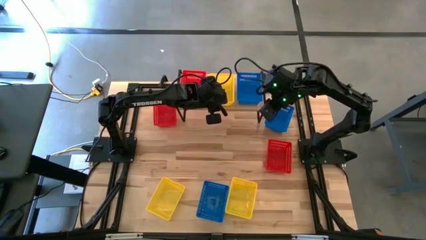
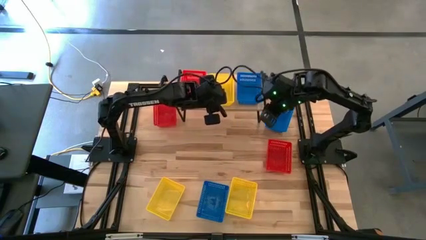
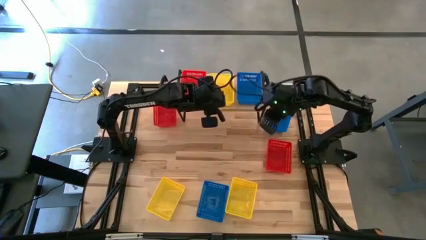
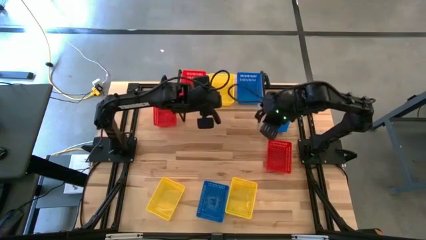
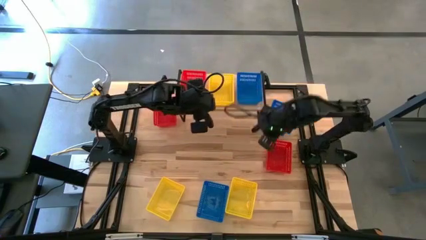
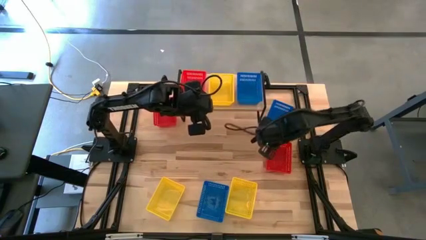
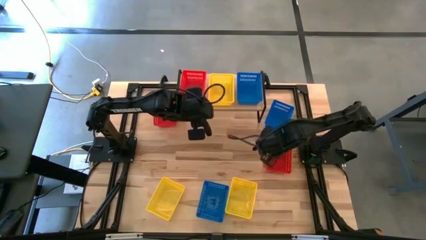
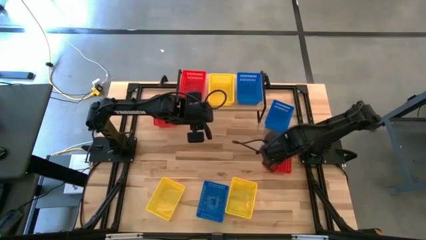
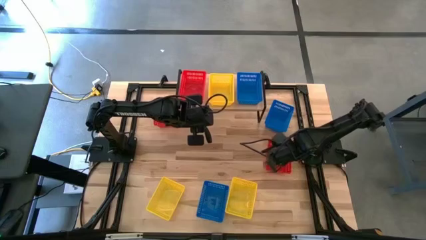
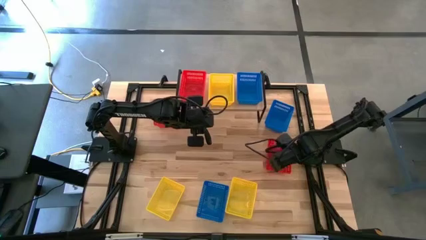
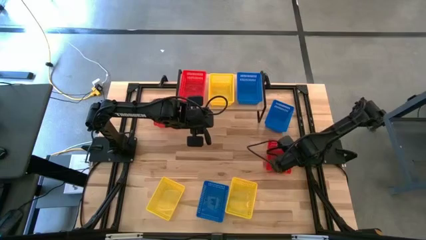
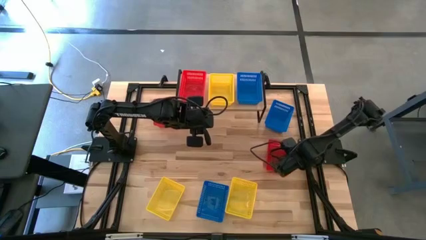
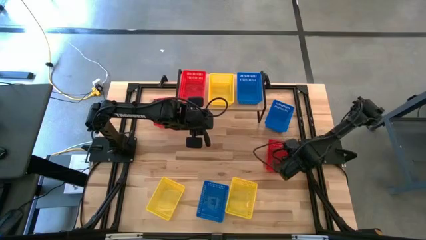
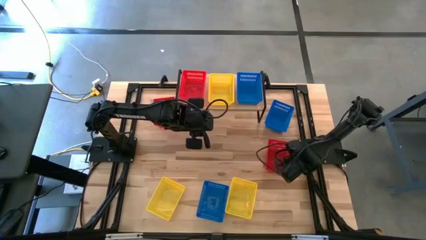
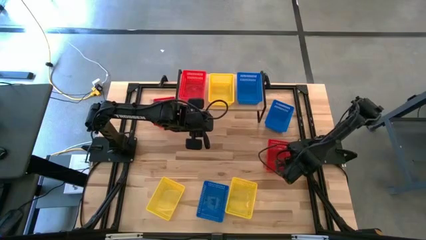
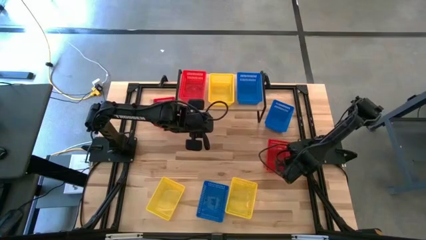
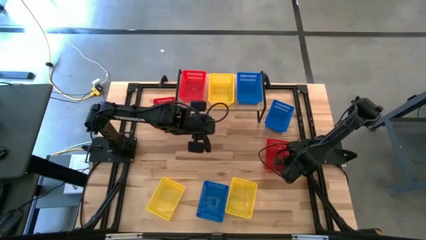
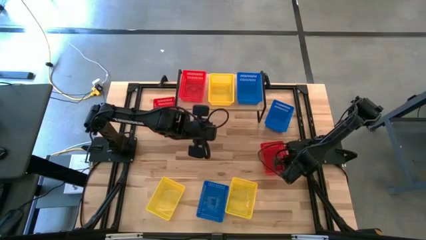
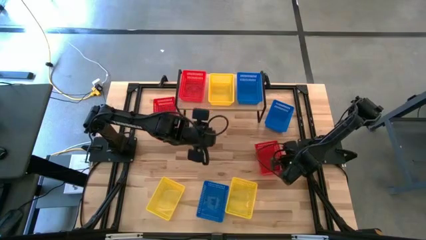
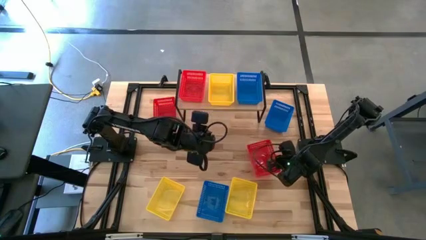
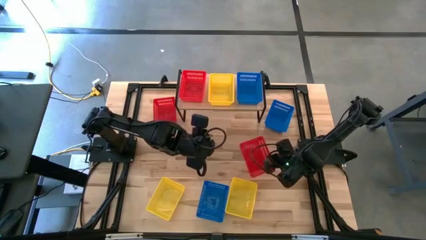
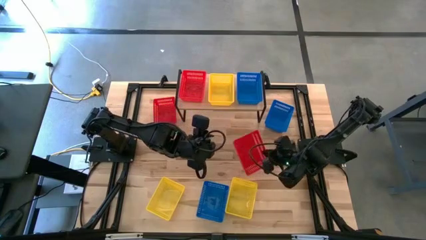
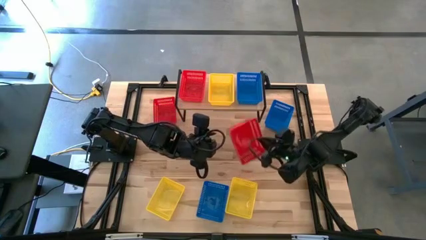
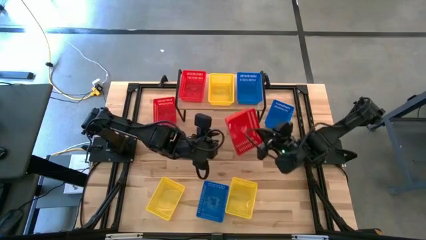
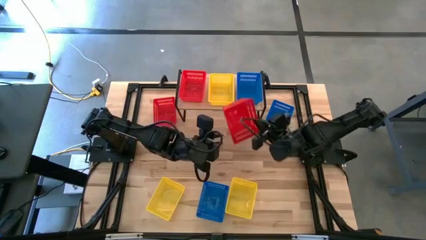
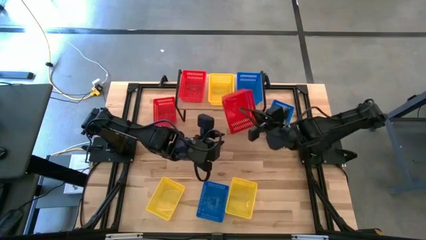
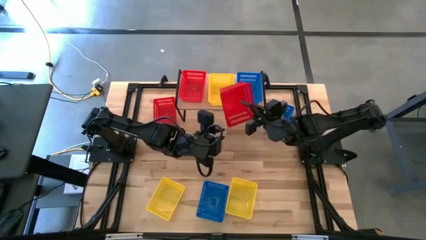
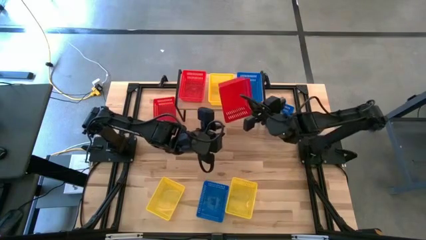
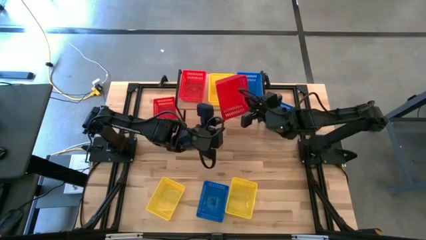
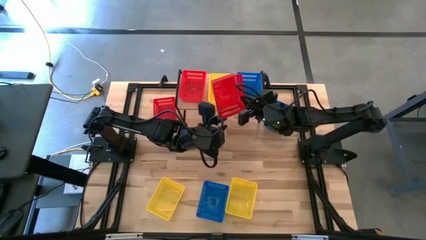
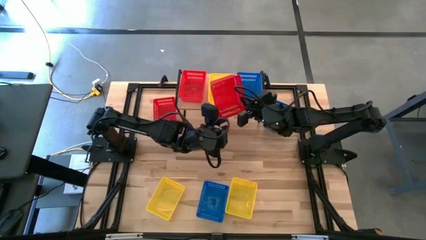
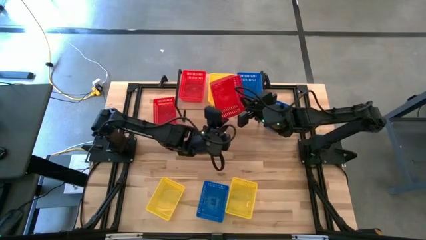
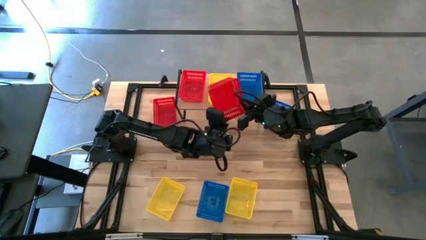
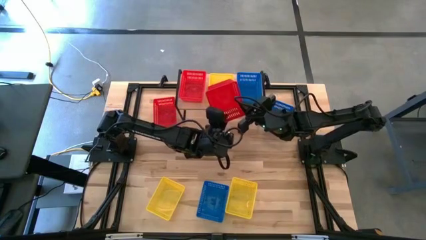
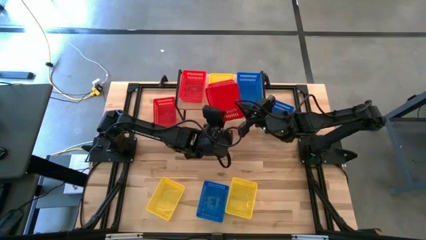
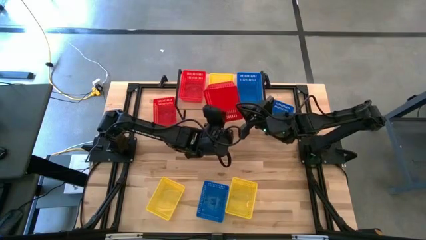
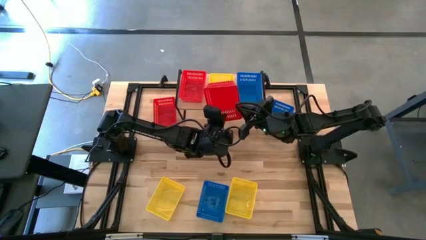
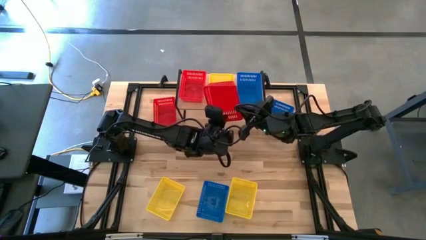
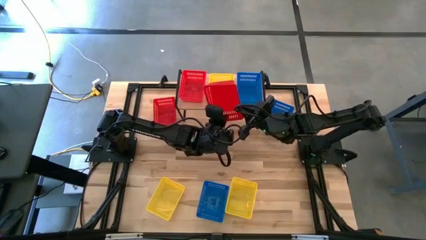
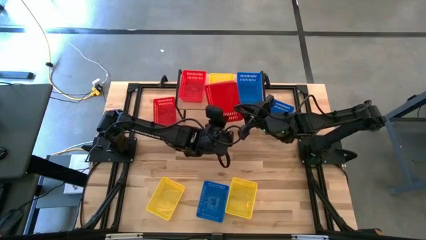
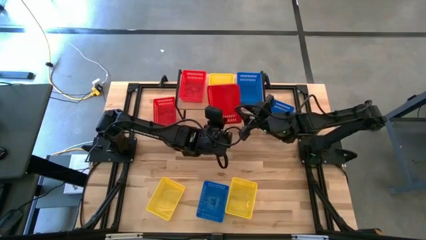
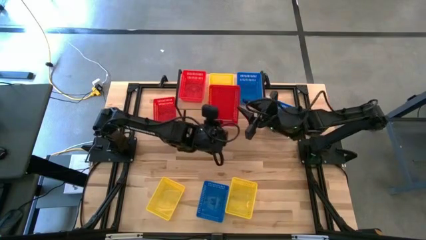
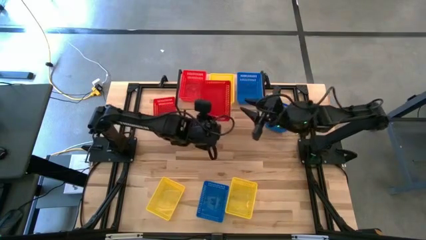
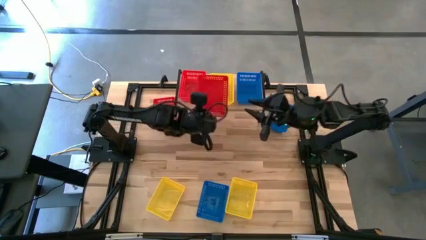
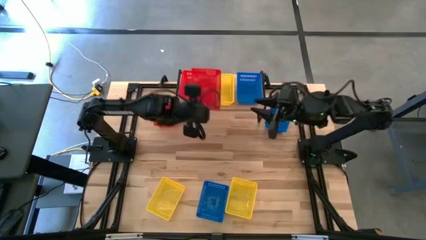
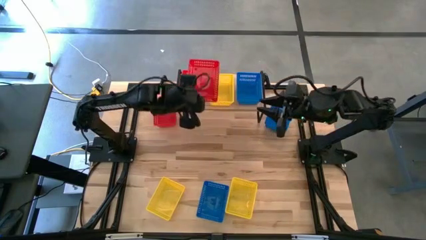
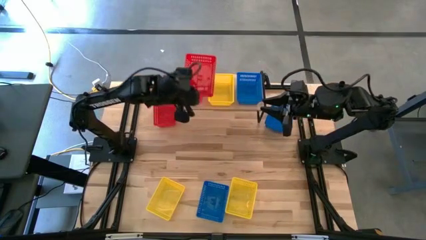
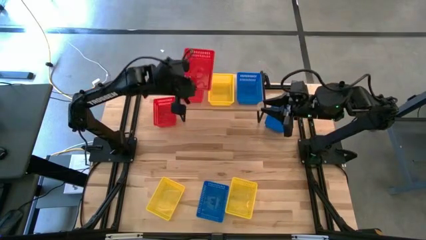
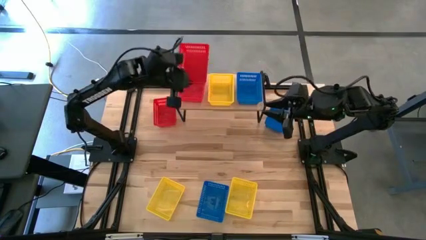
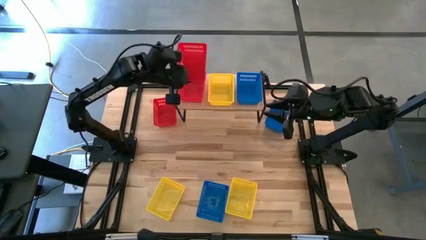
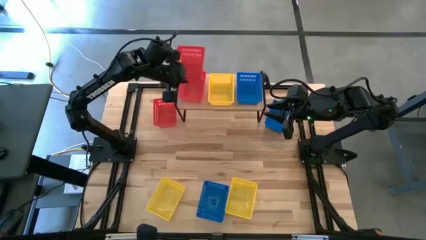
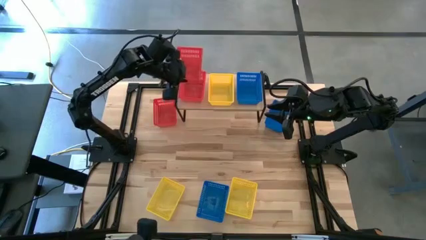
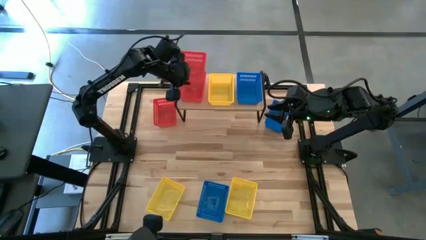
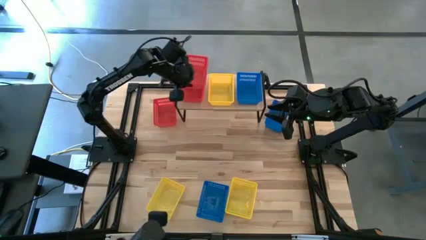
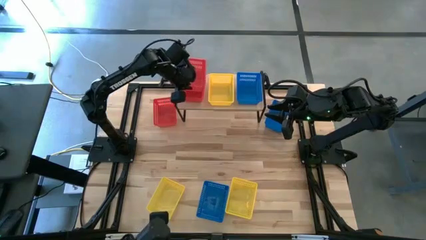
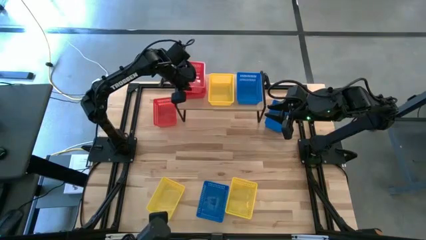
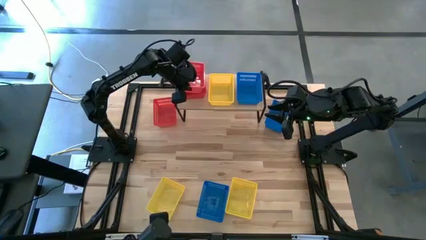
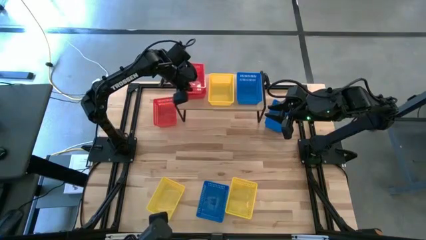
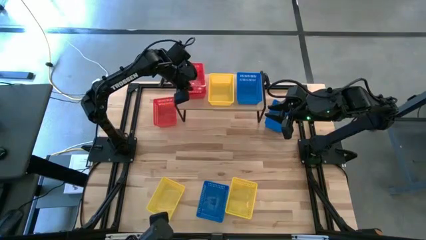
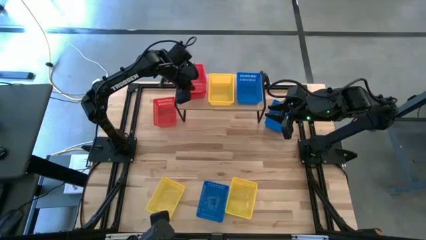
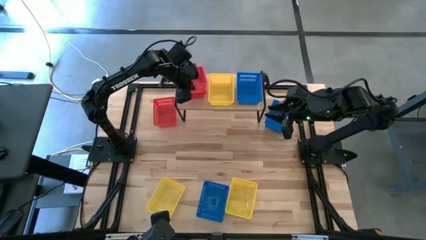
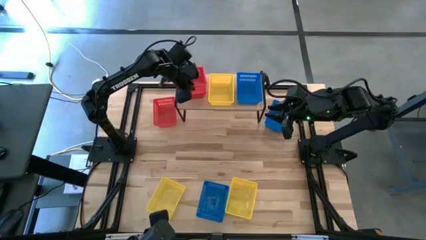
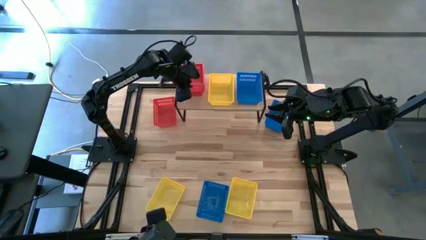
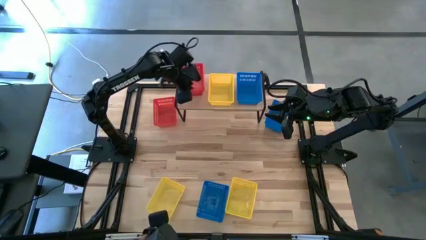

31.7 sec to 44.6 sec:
Task: Stack baskets on shelf by color
Stack the right red bin on top of the red bin on the shelf
